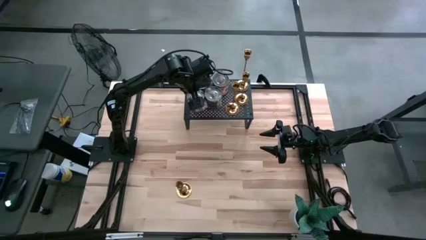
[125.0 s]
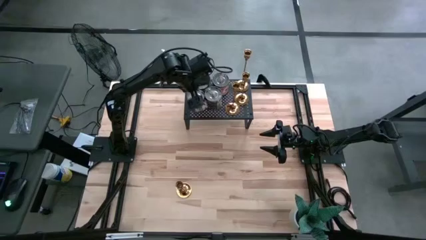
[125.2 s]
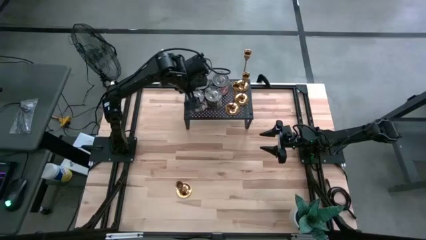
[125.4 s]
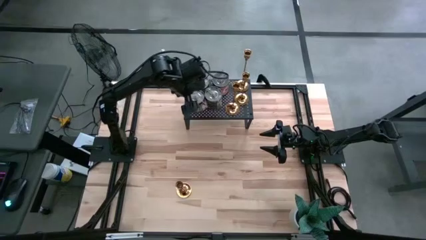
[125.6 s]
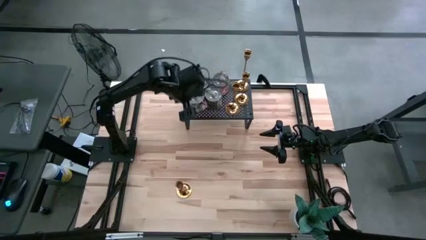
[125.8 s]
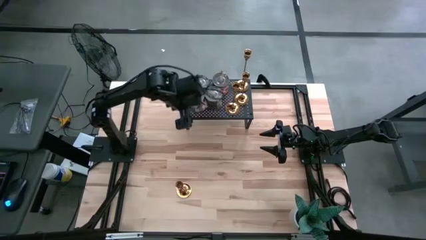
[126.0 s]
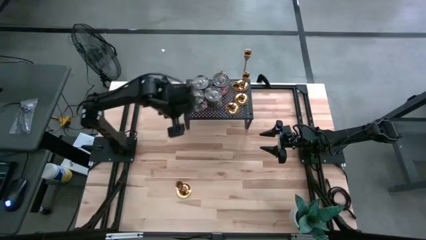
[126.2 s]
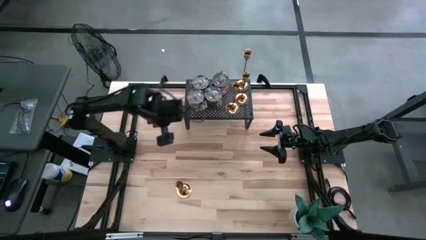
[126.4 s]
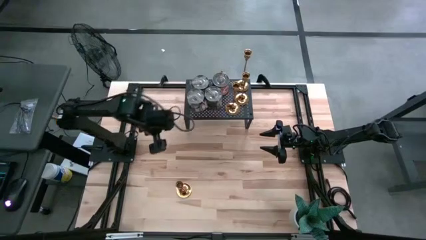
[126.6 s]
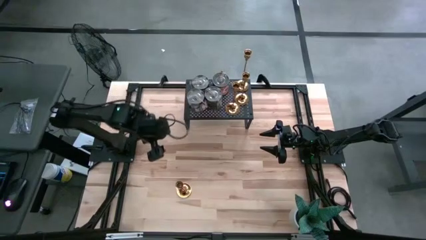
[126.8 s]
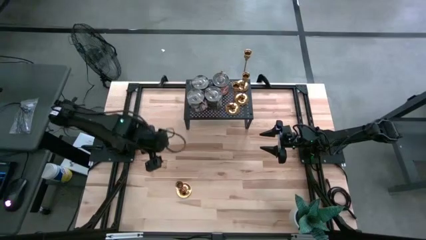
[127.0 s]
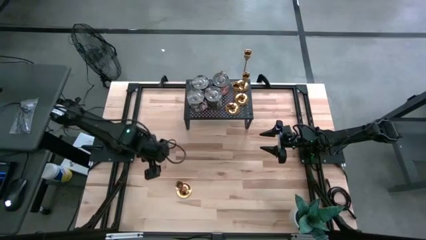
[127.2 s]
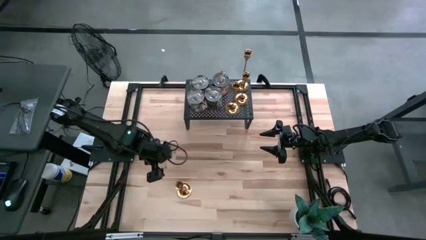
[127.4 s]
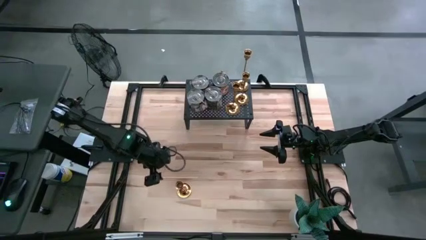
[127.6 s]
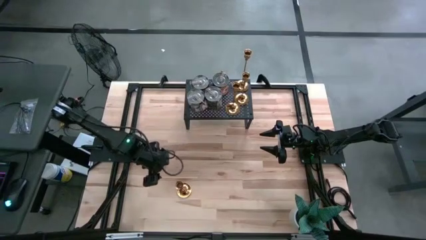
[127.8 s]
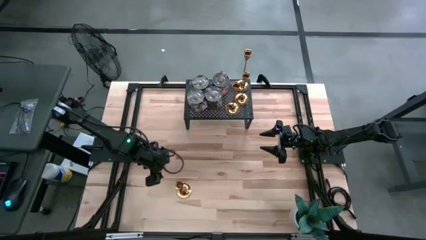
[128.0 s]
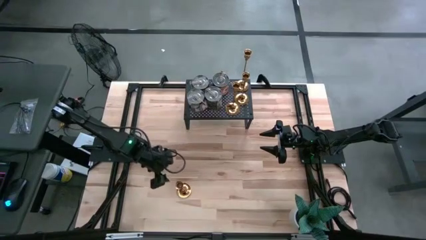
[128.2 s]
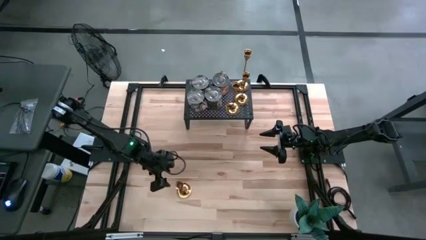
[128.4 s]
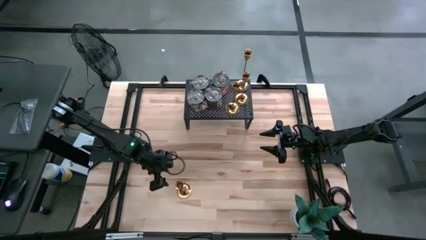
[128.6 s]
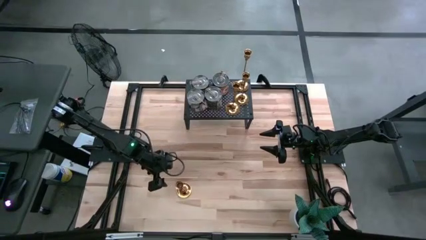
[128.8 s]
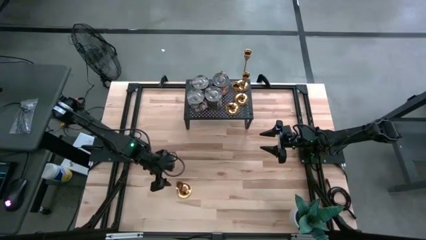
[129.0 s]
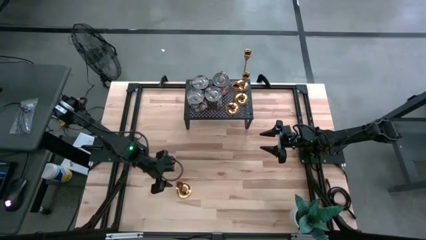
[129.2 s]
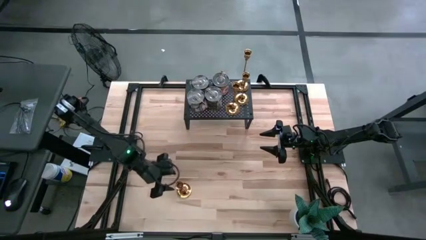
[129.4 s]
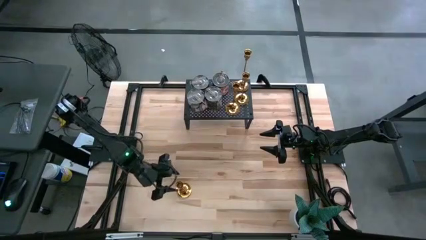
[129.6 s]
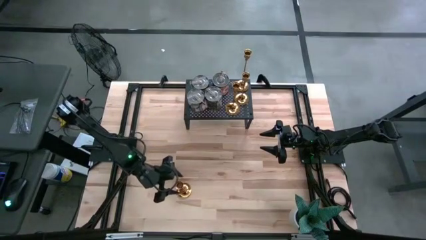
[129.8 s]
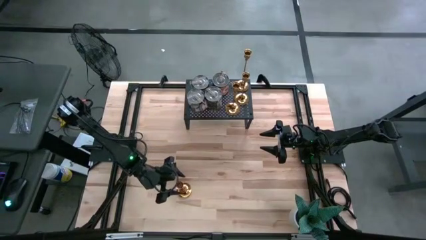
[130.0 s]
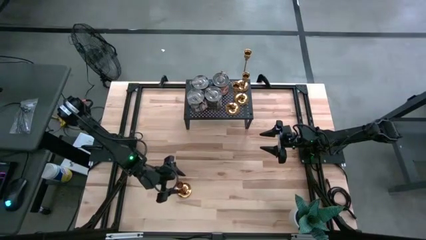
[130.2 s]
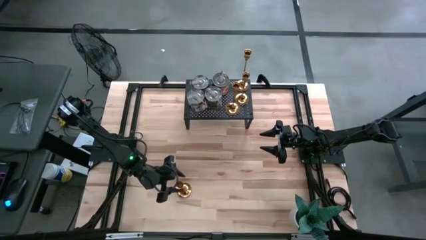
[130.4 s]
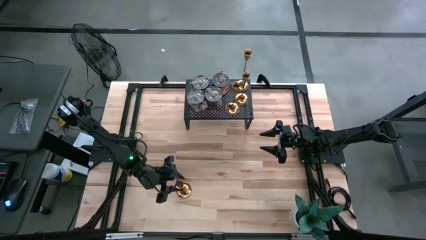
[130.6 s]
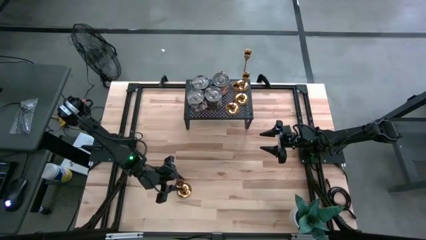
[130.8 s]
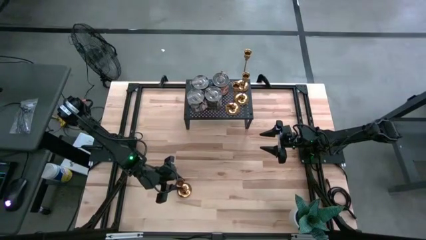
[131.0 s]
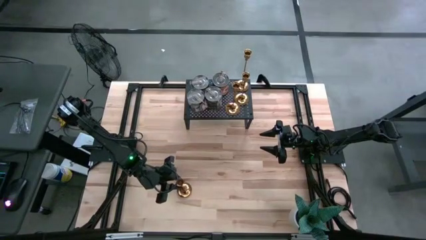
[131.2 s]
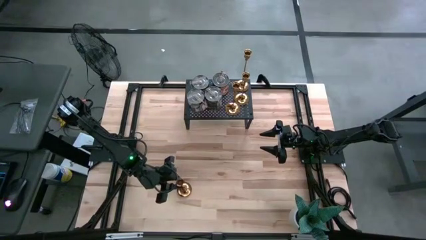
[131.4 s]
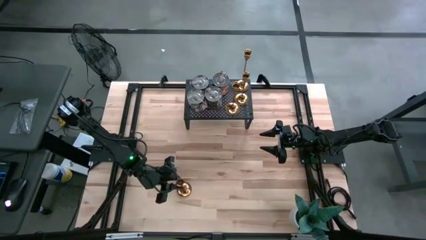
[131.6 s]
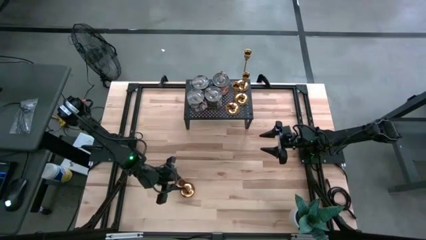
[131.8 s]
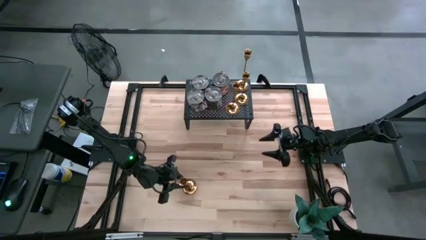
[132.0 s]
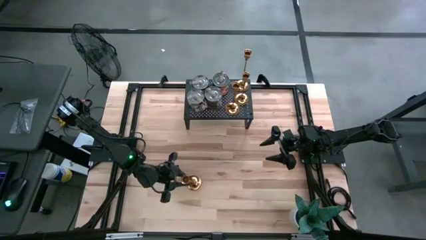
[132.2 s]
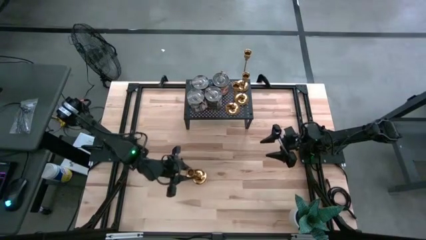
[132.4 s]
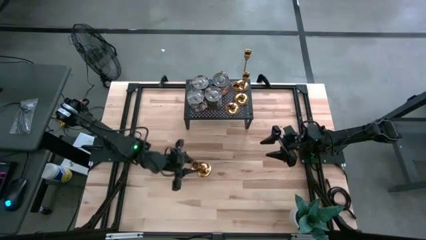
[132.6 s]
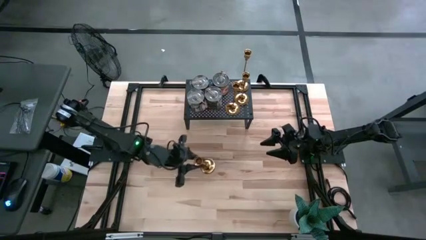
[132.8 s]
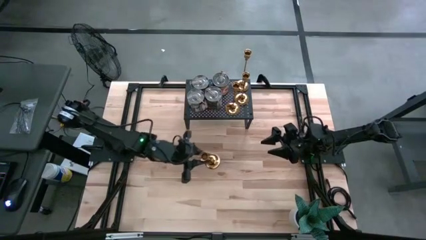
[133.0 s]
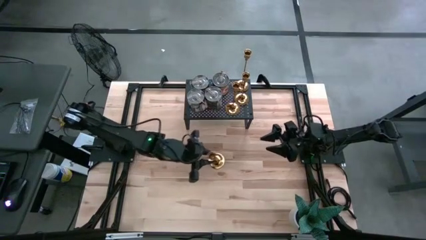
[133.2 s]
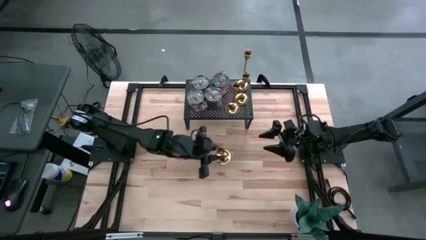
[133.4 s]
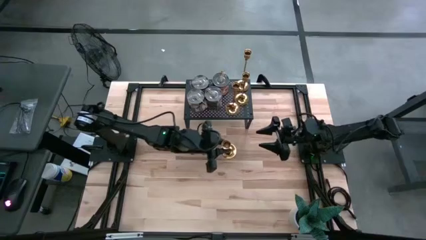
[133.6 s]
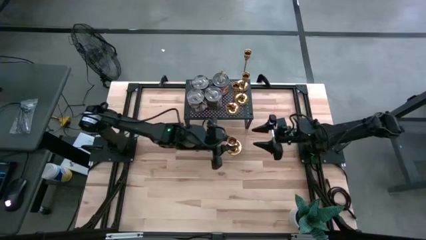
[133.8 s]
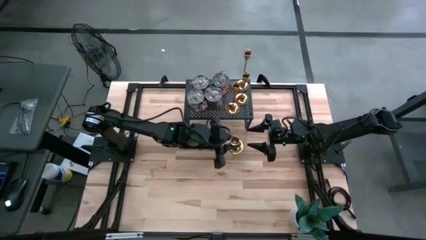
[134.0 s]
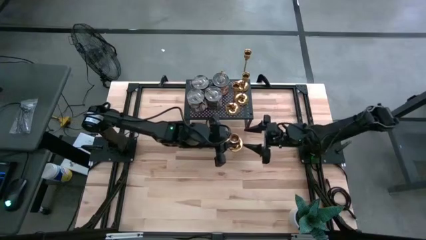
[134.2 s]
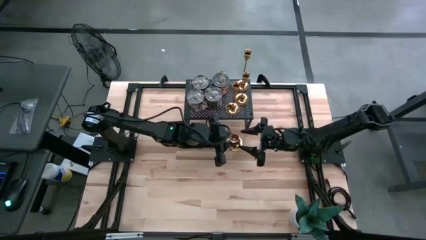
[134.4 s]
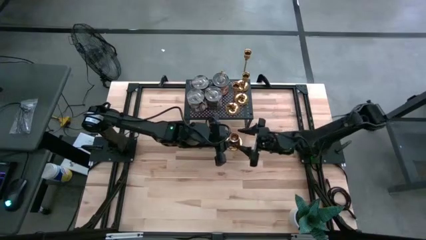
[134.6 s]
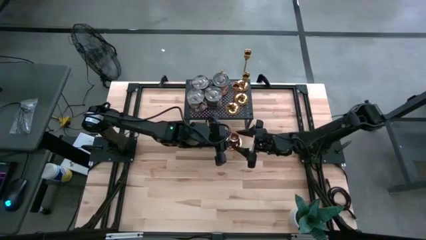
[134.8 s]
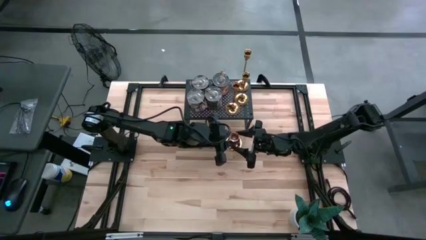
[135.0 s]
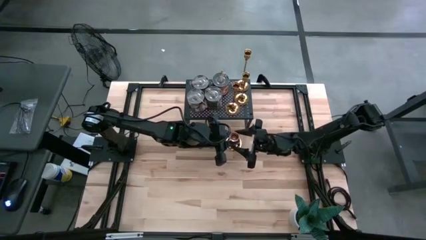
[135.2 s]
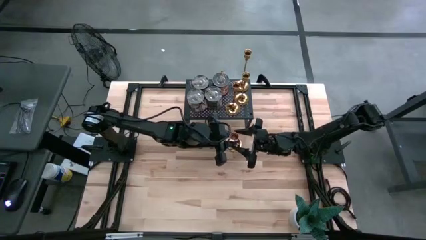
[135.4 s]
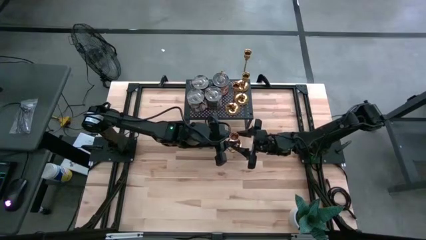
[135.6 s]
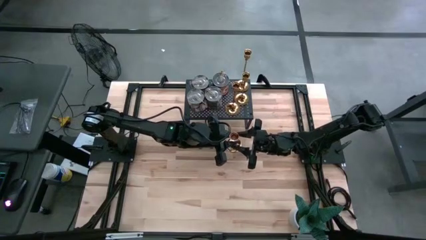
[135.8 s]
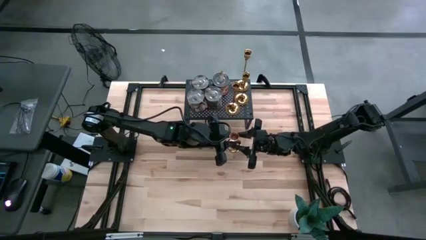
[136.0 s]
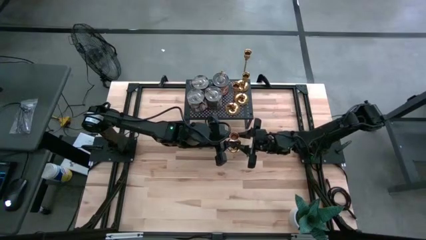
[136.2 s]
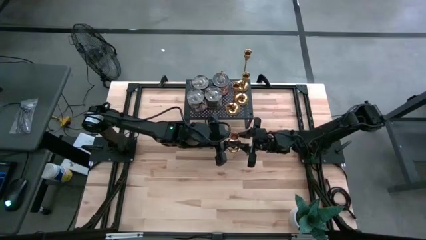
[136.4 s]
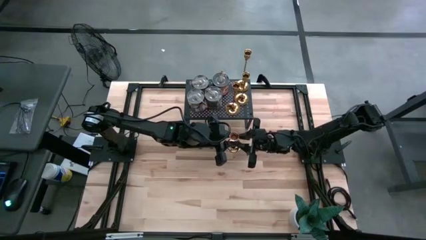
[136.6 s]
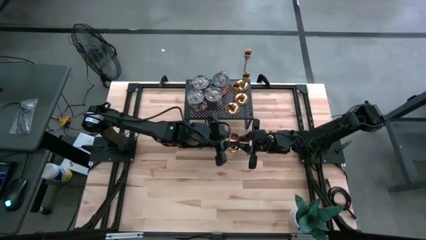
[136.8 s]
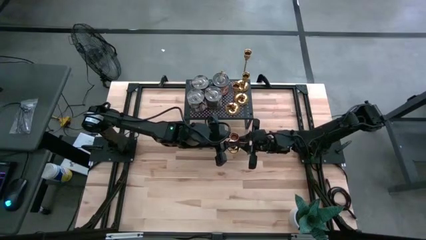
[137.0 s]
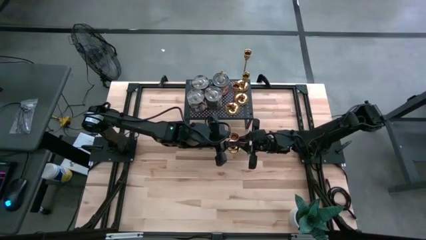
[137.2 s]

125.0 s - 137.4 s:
Task: Pick & Place candle stick holders
Align the golden candle holder with the golden candle holder on the shelf

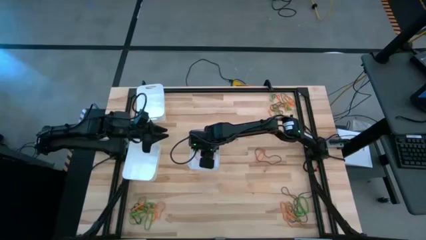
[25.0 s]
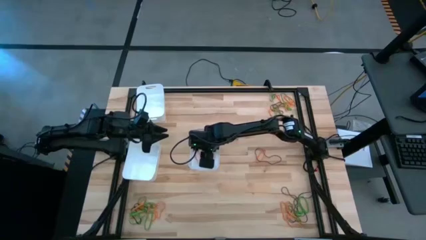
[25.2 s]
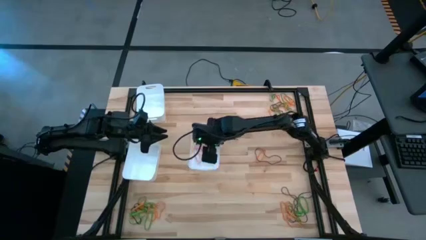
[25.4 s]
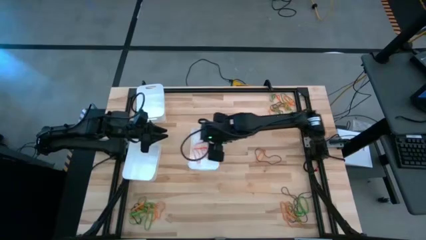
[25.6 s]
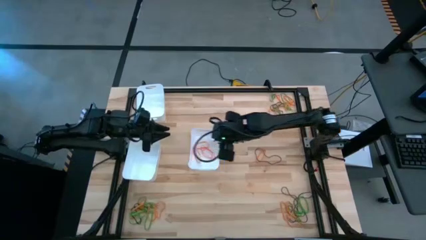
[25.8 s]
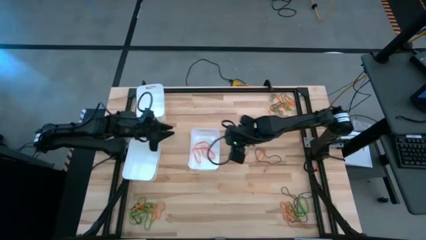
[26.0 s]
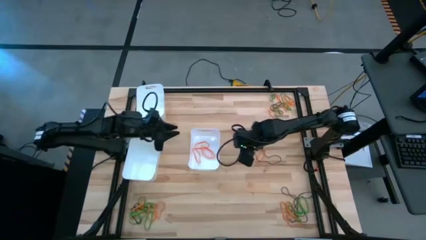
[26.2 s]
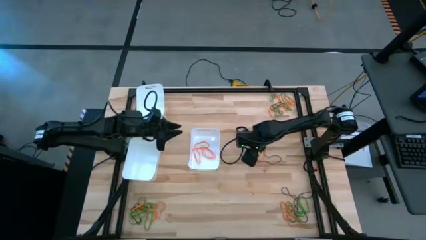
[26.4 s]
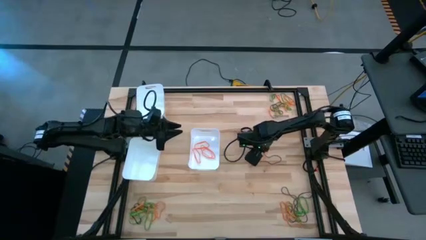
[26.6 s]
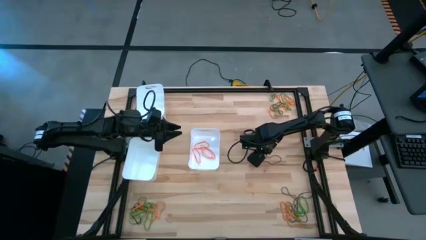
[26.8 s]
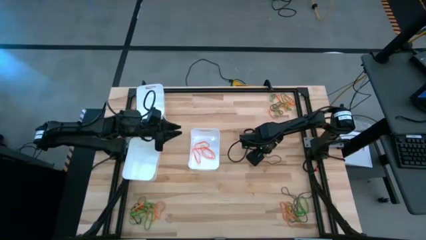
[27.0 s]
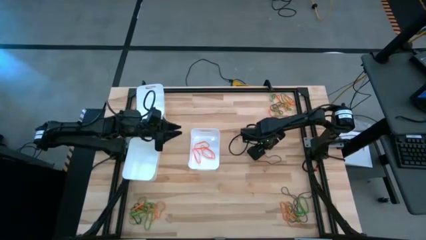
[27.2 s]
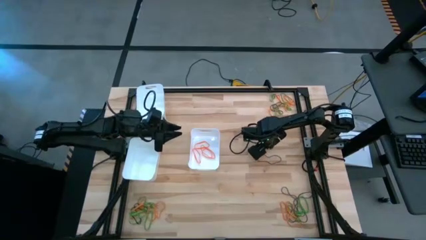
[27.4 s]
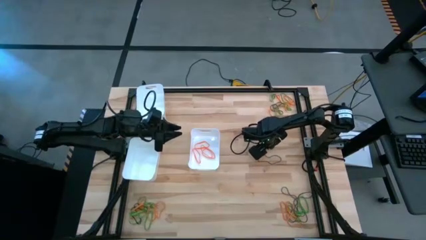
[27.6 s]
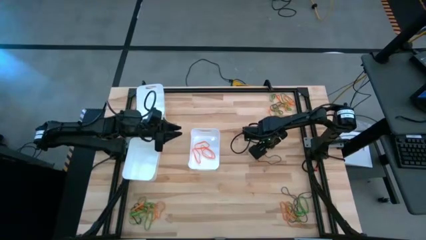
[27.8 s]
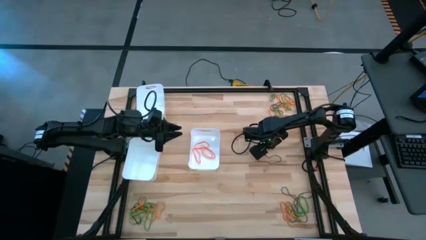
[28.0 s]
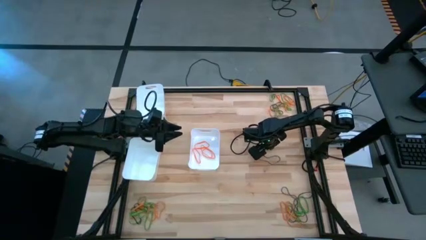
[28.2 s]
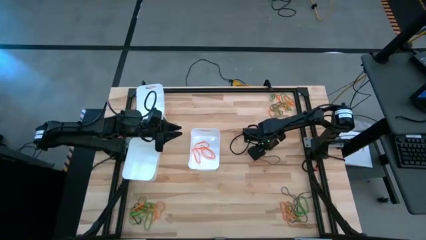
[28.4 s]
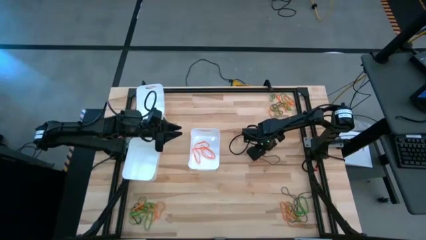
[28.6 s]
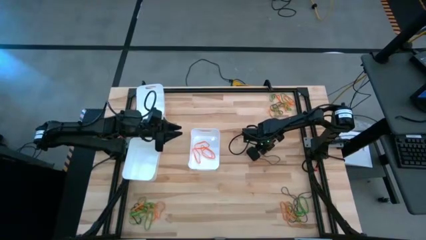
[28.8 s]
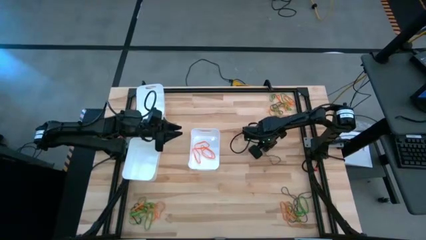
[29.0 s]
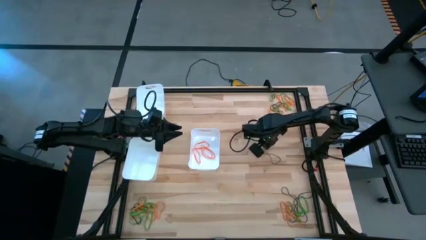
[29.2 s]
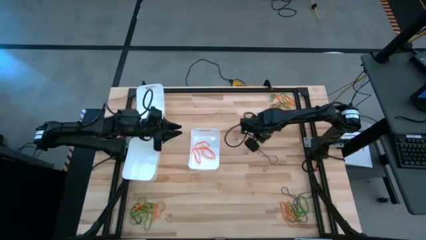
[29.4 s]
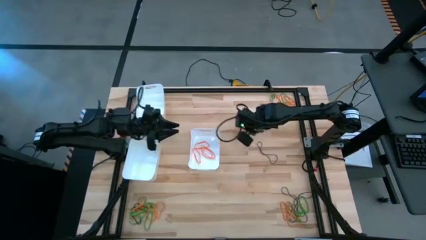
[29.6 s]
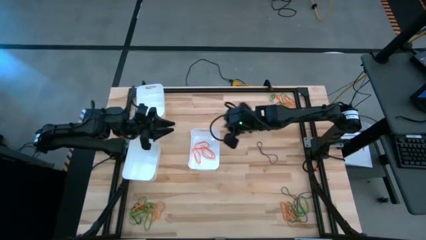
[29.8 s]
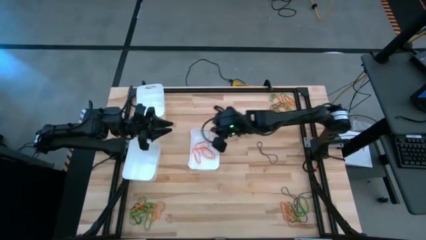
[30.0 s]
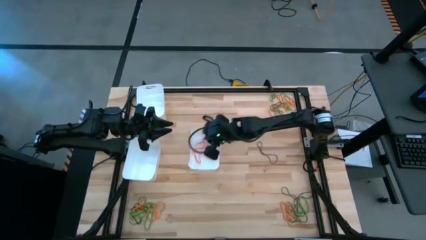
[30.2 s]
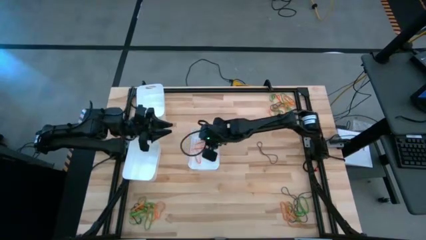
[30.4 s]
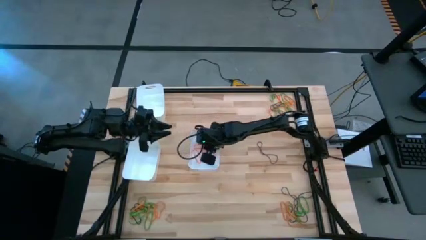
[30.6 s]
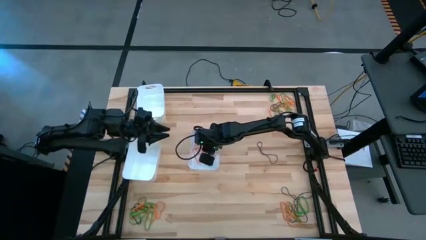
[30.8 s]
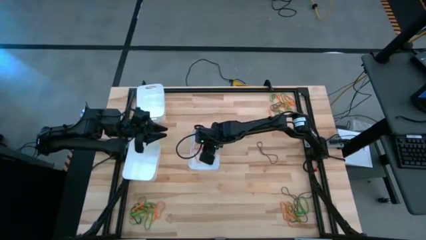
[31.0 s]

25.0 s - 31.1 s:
Task: Sort rubber bands into baskets
Put the orange rubber band into the bottom right white bin
